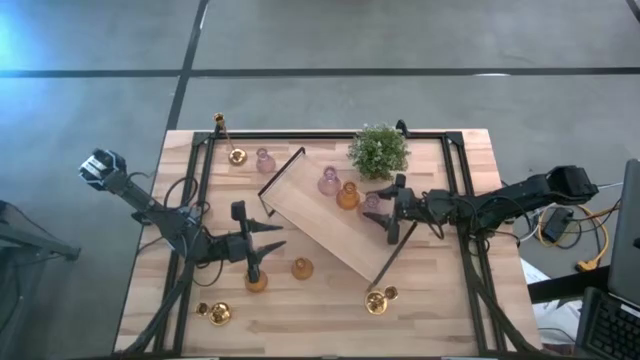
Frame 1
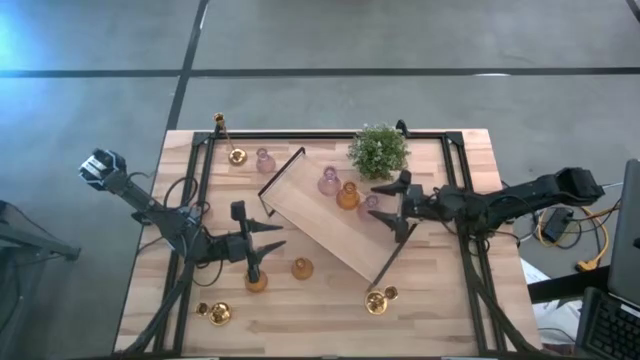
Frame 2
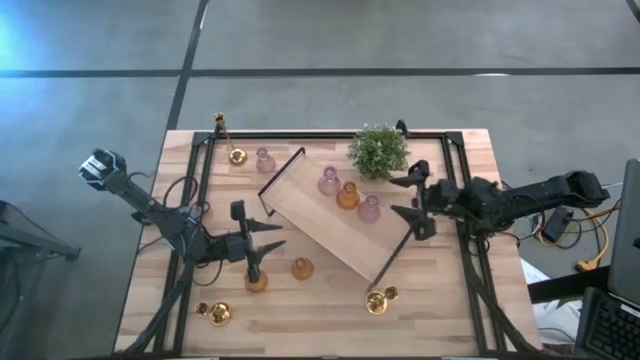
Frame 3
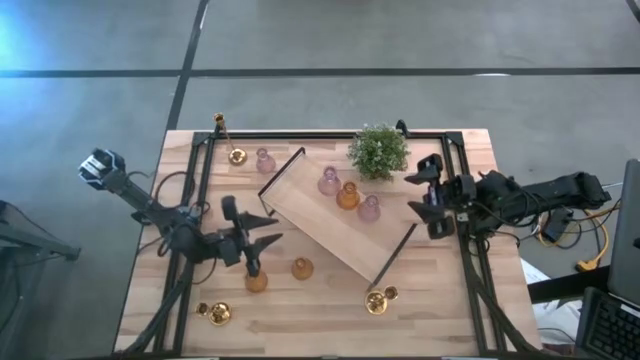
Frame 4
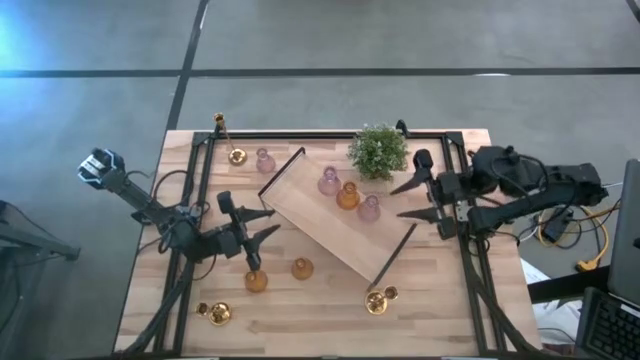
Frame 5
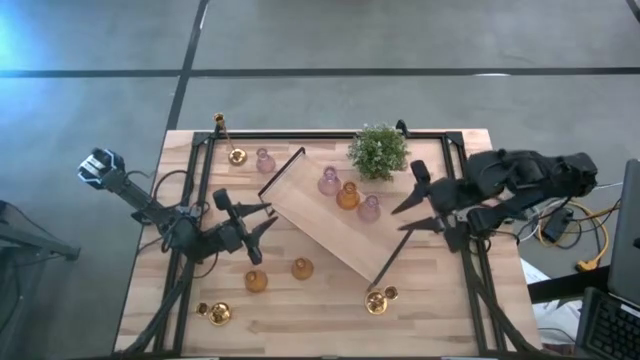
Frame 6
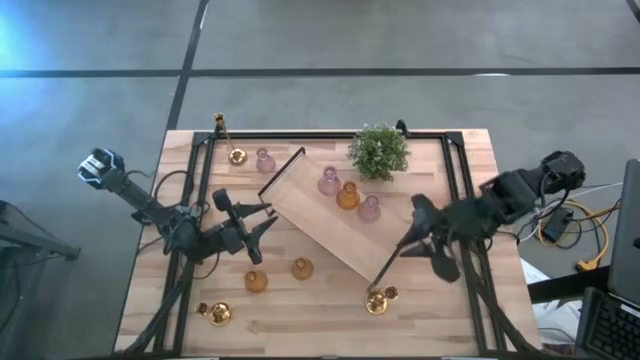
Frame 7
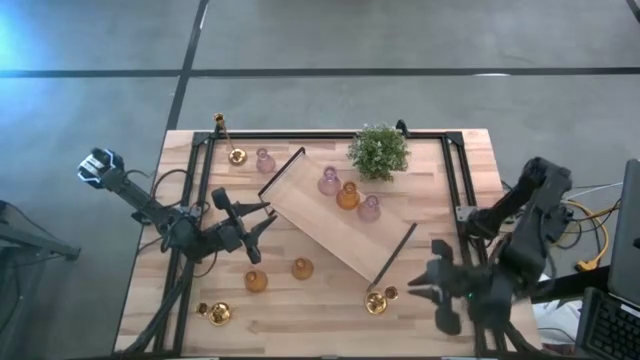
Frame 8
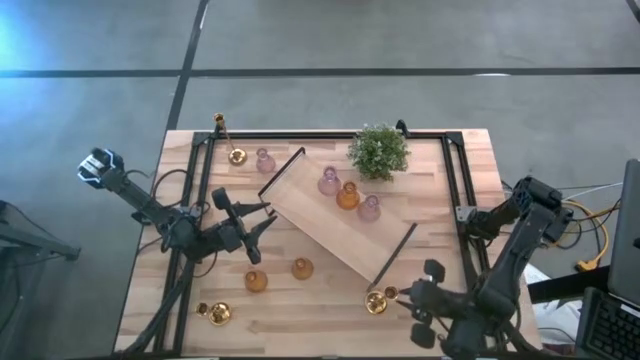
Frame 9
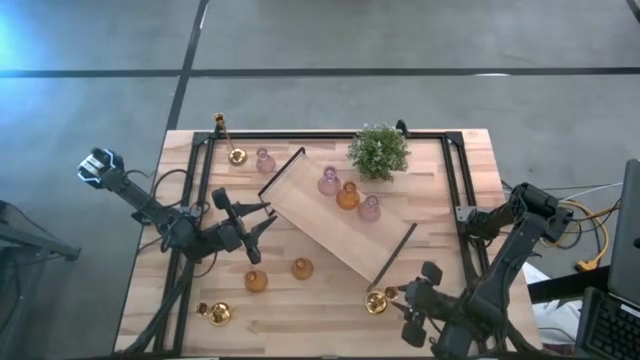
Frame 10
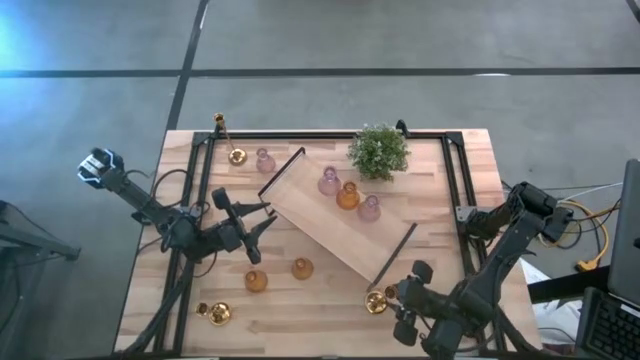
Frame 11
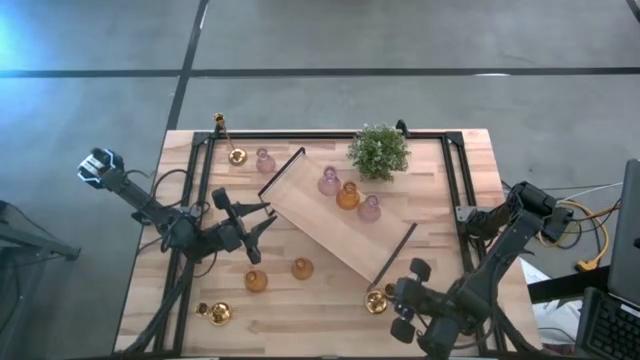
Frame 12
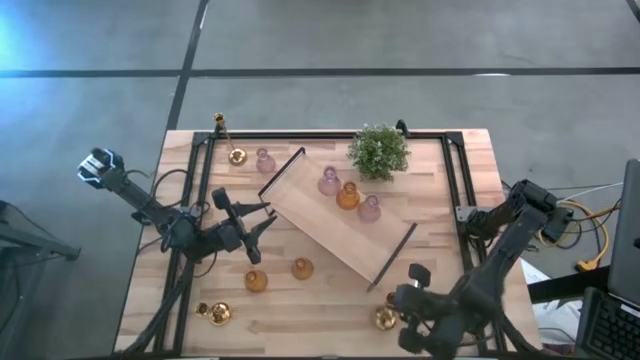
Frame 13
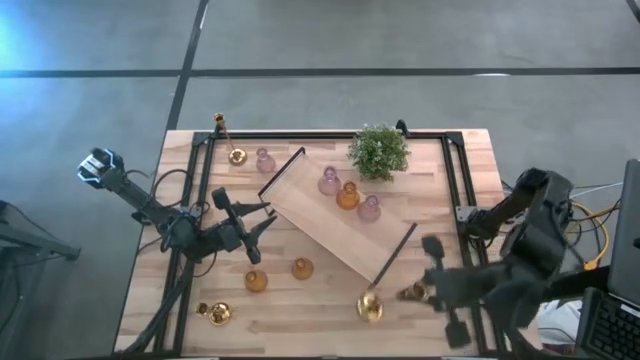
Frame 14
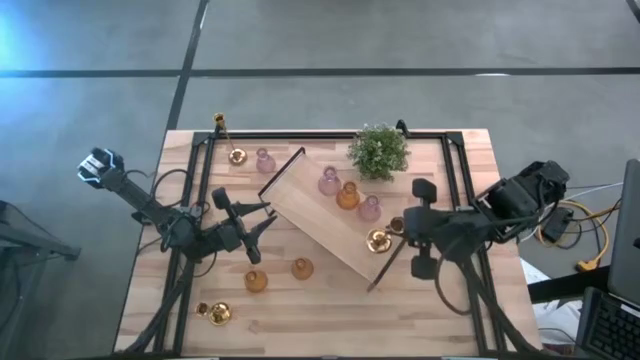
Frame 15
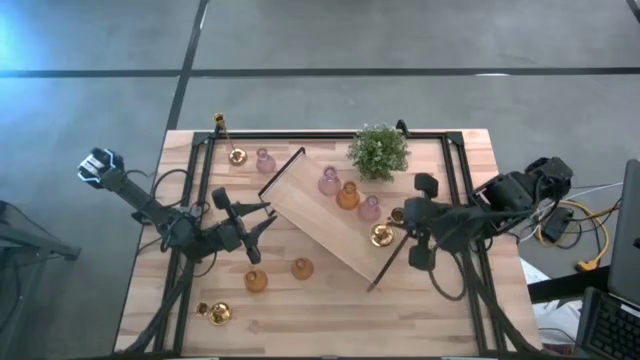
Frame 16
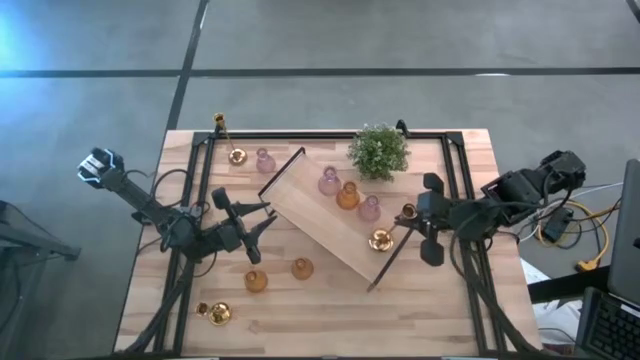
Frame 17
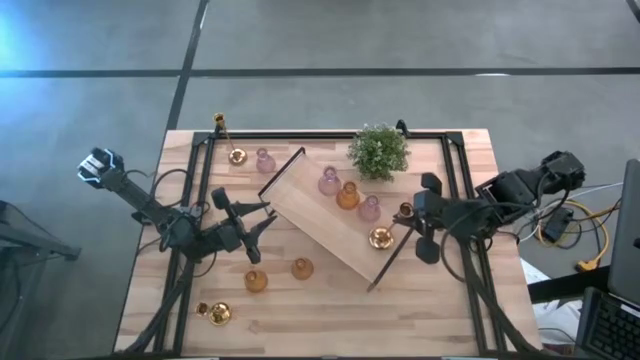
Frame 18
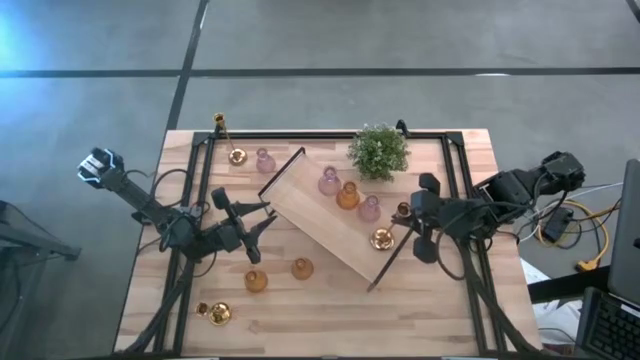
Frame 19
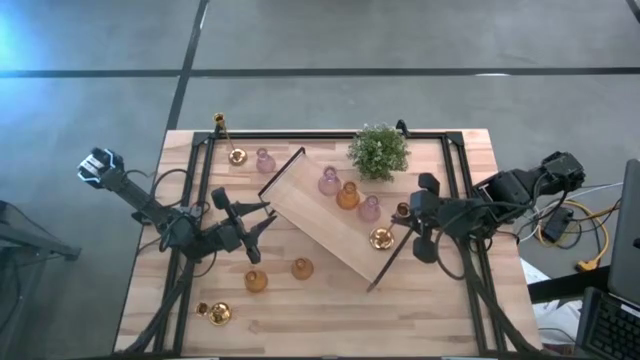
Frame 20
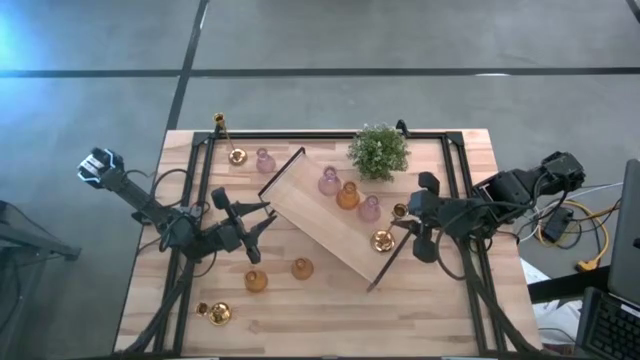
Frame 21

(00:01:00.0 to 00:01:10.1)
Task: Pick & Place candle stick holders
Put the gold candle holder on the shelf

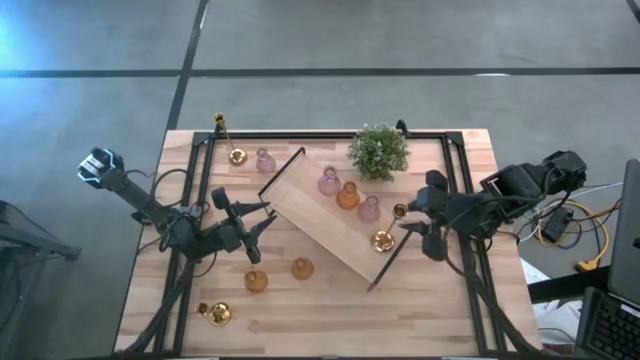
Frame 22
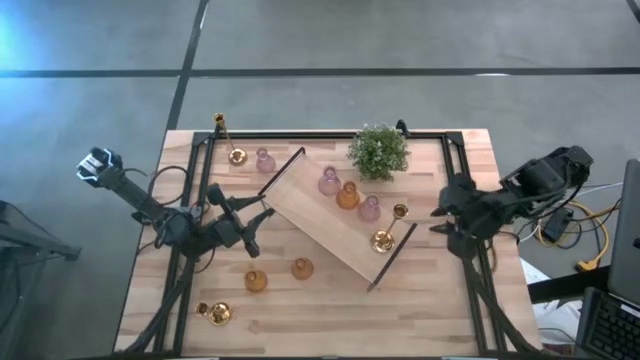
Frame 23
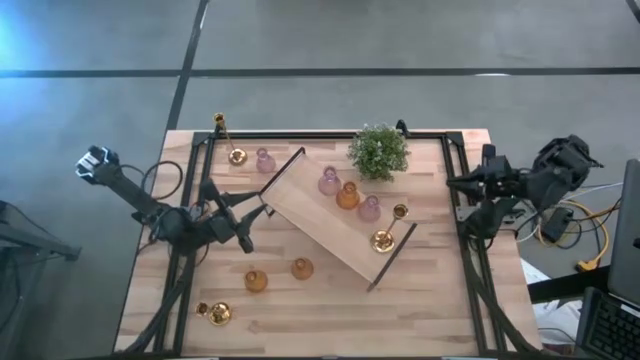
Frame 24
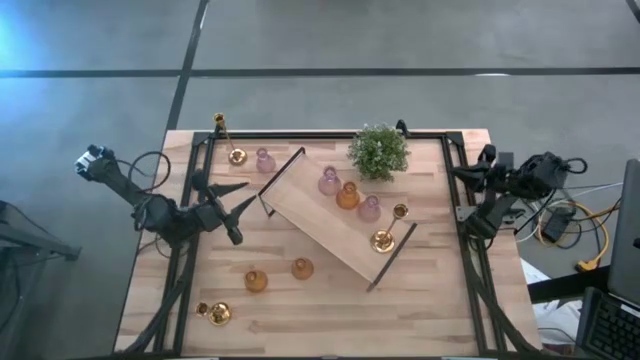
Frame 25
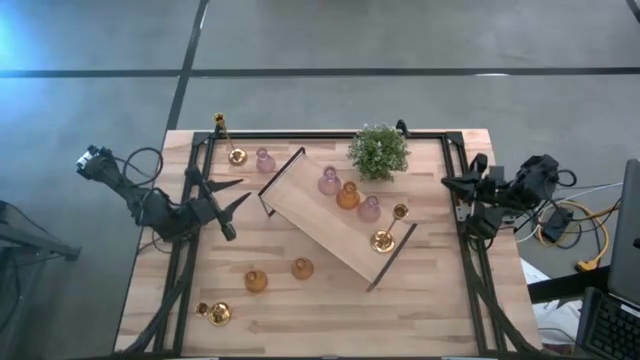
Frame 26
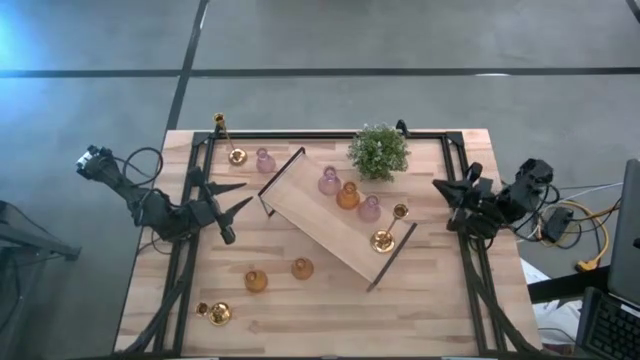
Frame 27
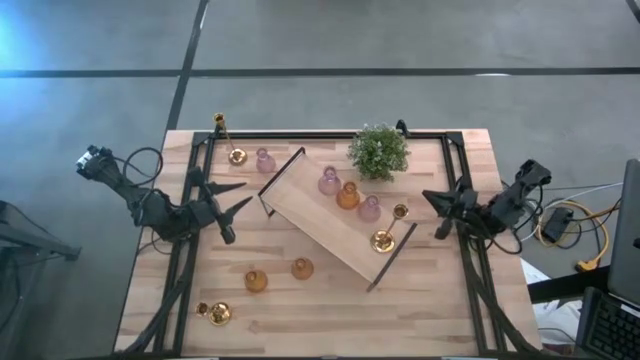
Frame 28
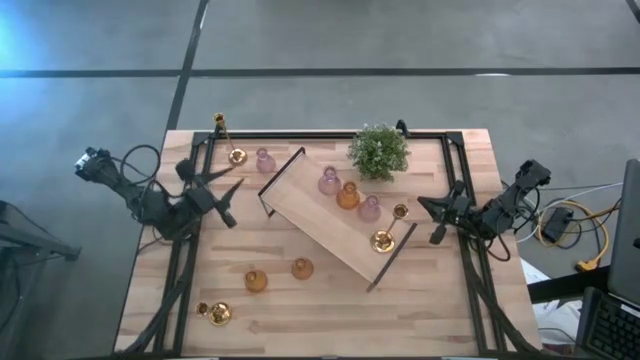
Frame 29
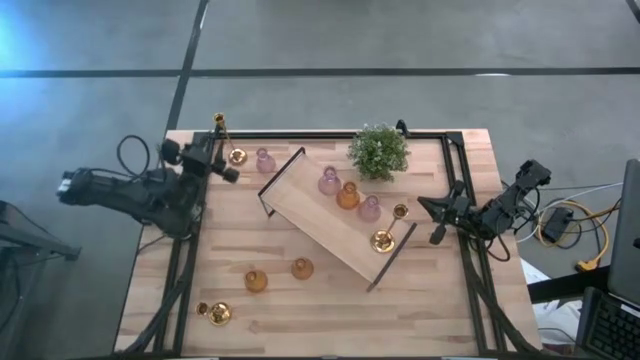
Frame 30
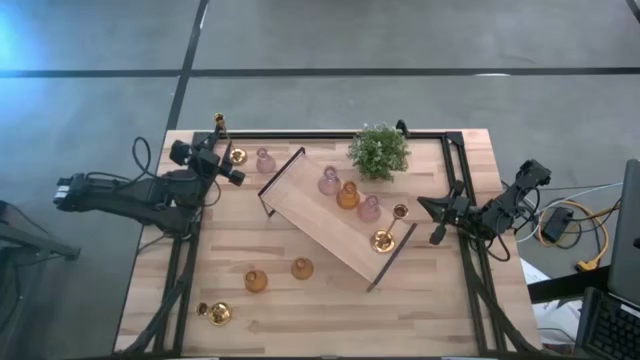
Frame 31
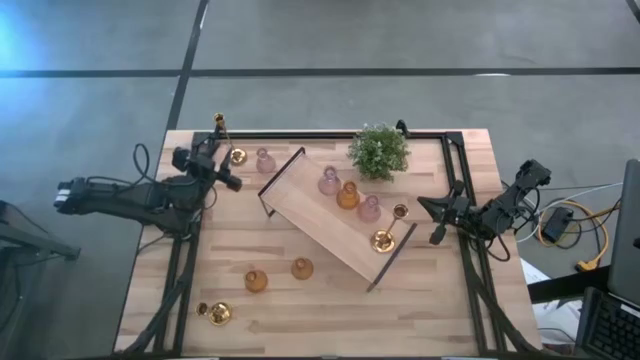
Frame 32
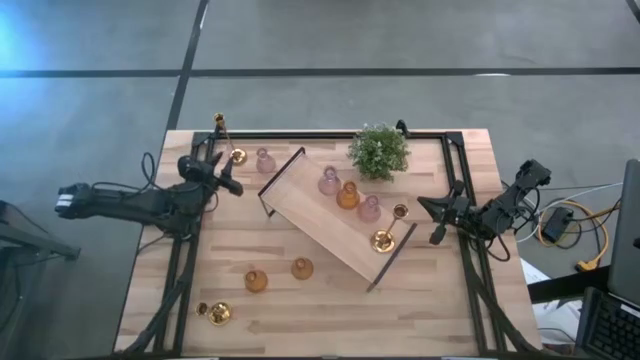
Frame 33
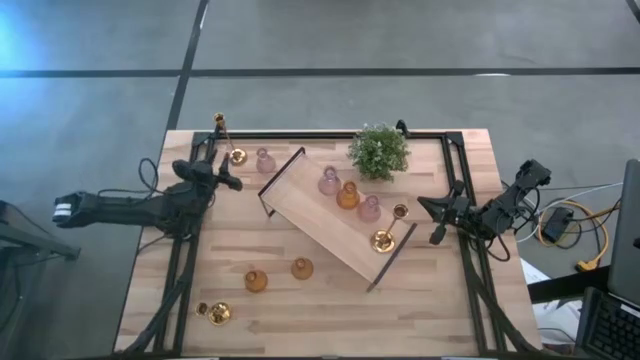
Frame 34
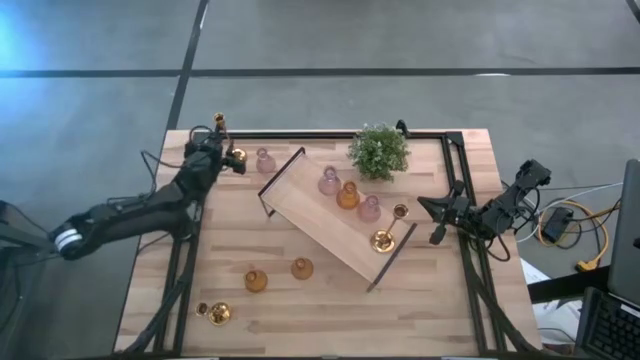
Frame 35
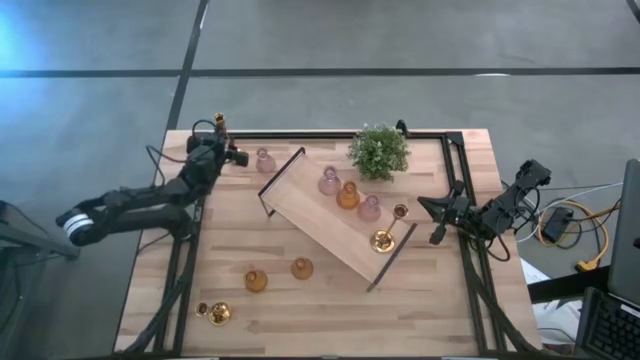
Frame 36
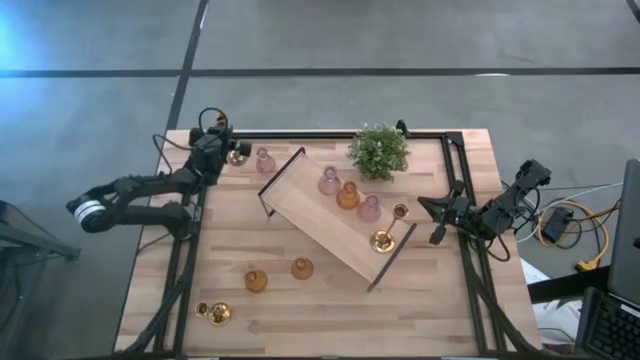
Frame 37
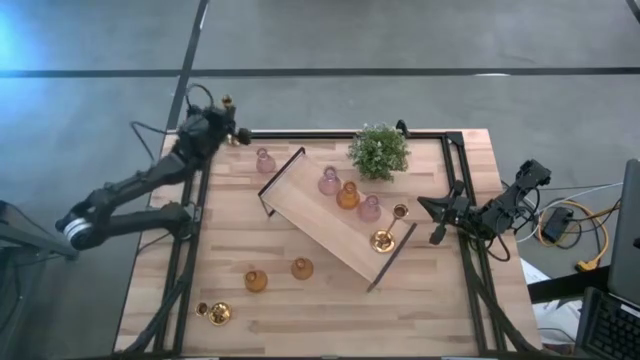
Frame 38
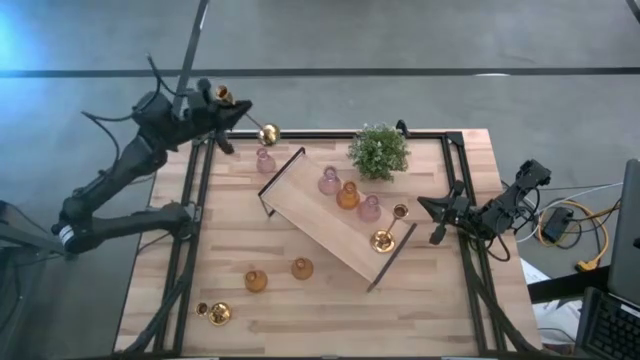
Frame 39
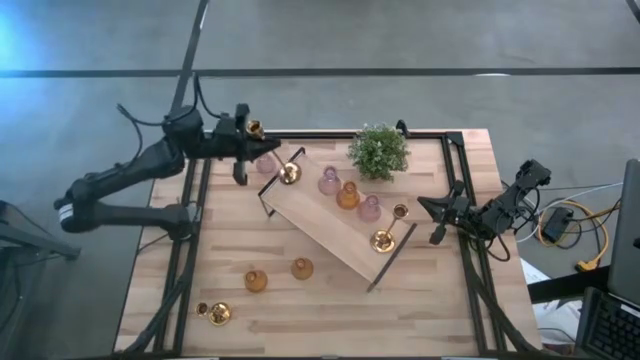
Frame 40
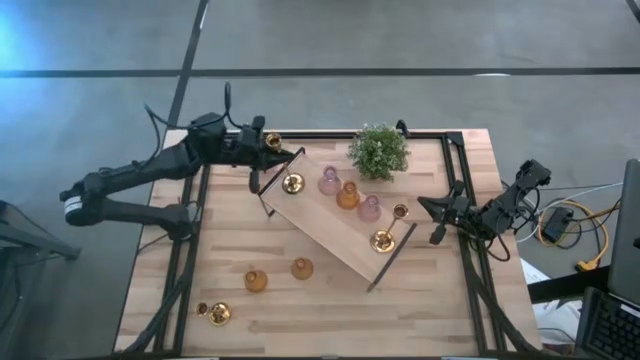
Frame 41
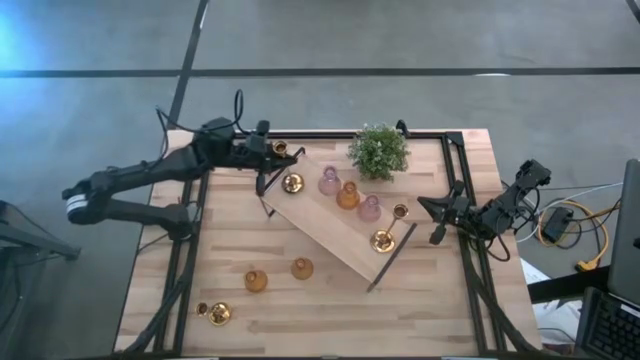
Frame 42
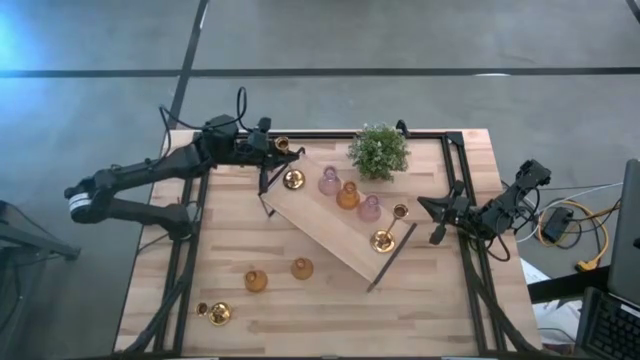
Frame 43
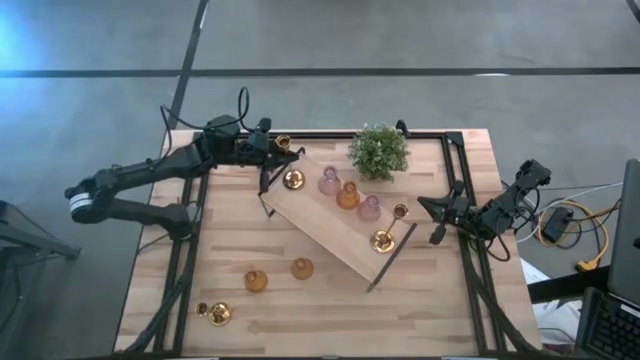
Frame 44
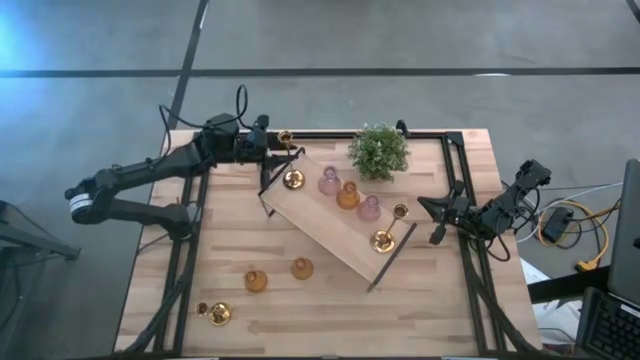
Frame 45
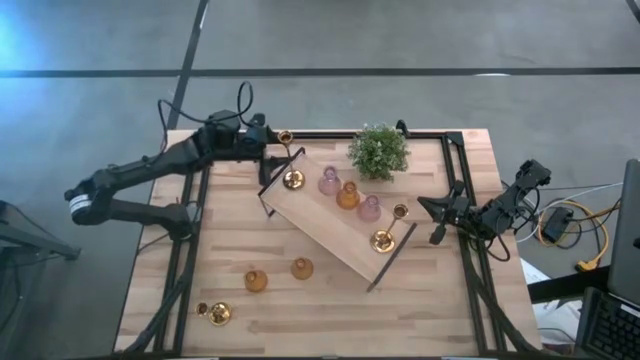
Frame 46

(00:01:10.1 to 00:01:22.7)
Put the gold candle holder on the shelf
